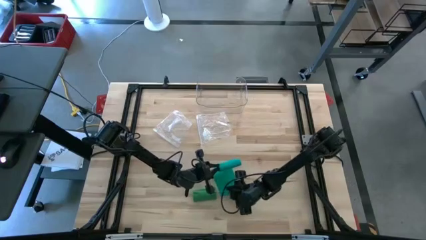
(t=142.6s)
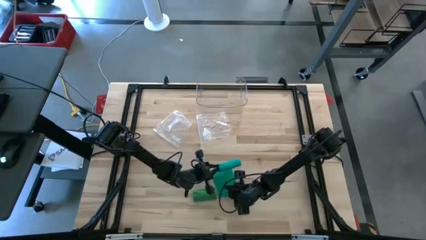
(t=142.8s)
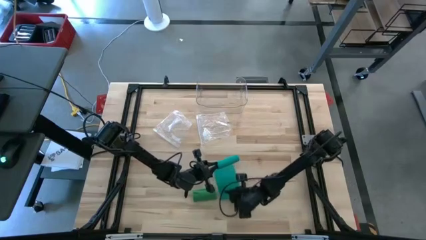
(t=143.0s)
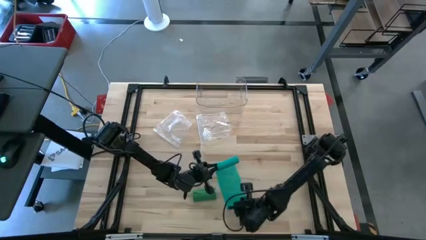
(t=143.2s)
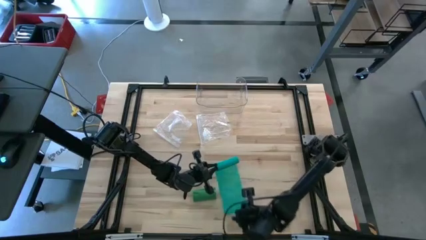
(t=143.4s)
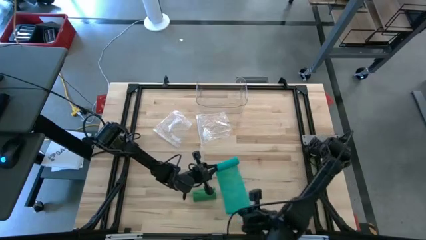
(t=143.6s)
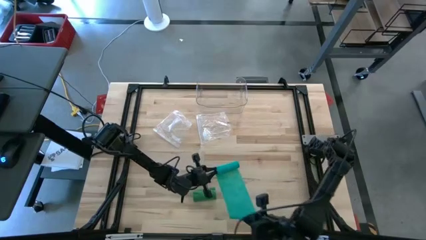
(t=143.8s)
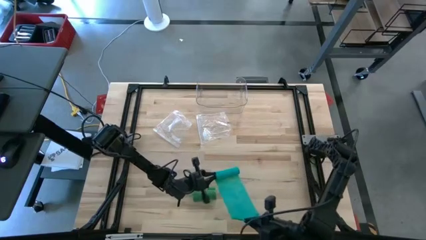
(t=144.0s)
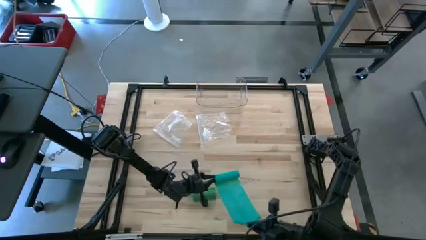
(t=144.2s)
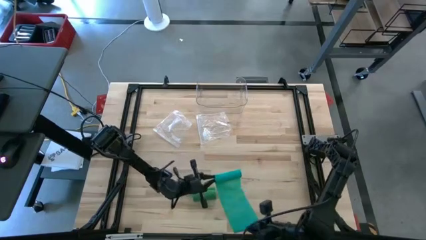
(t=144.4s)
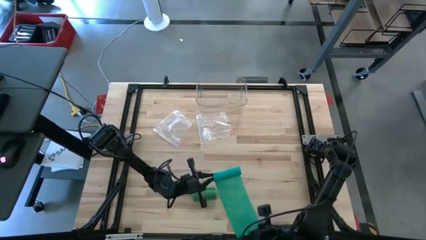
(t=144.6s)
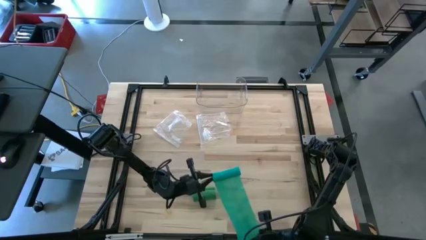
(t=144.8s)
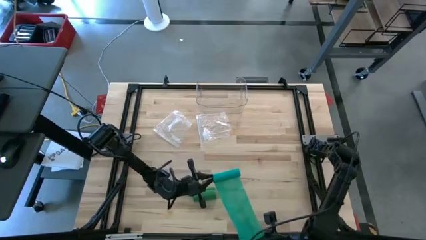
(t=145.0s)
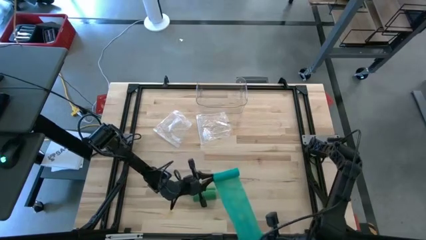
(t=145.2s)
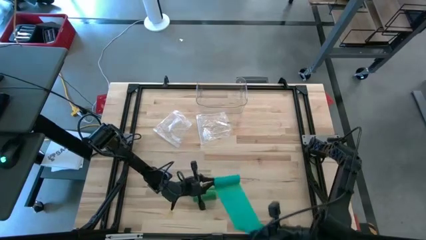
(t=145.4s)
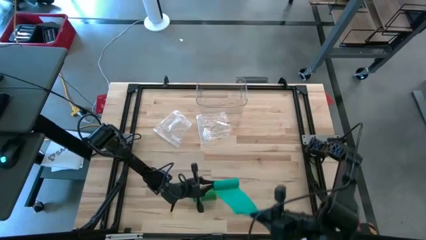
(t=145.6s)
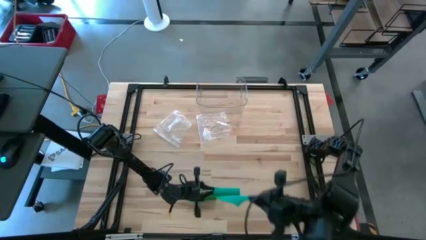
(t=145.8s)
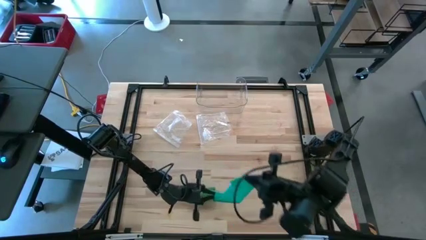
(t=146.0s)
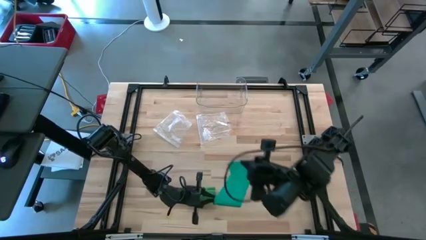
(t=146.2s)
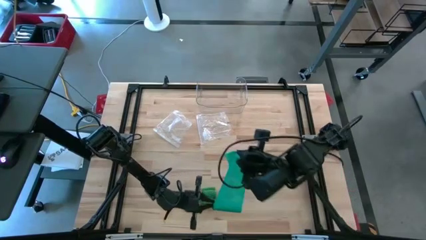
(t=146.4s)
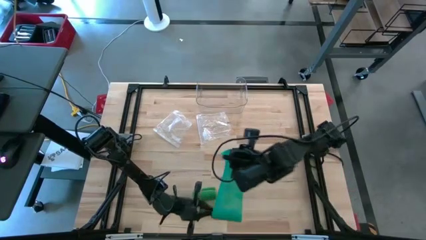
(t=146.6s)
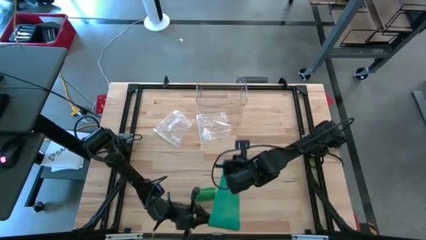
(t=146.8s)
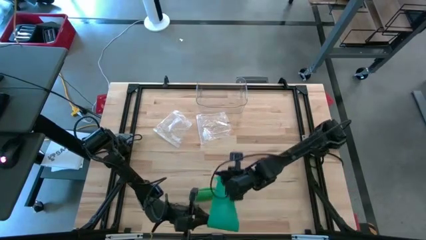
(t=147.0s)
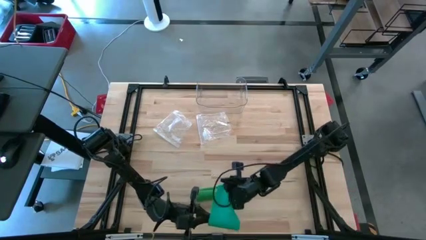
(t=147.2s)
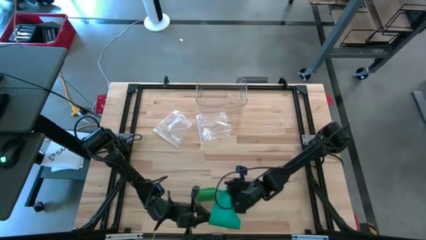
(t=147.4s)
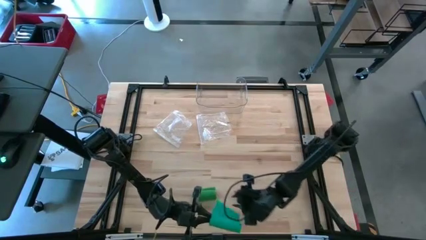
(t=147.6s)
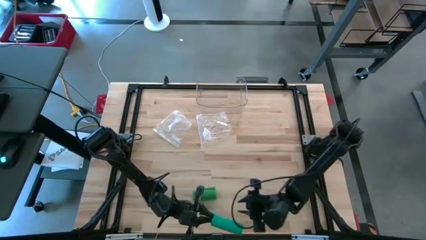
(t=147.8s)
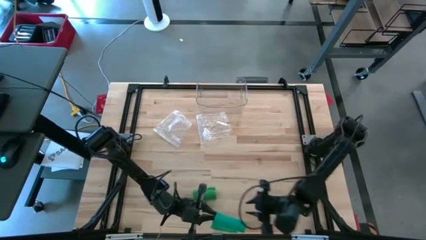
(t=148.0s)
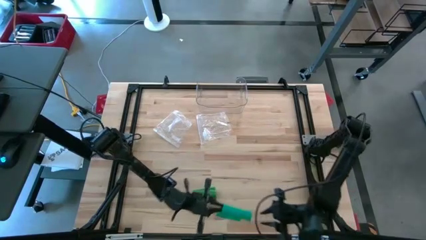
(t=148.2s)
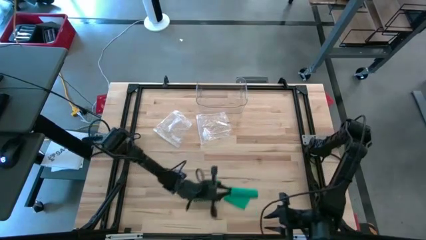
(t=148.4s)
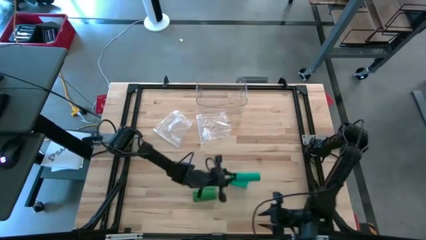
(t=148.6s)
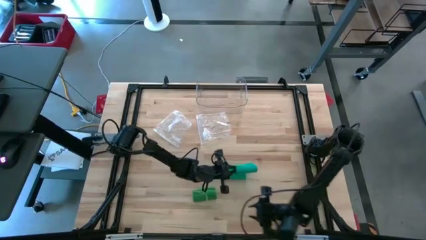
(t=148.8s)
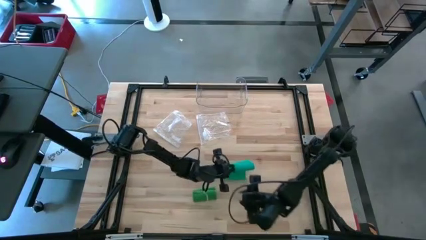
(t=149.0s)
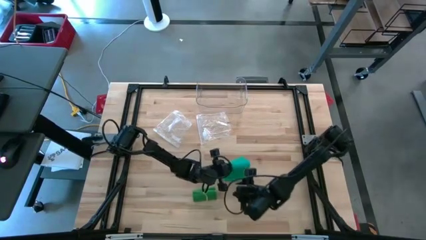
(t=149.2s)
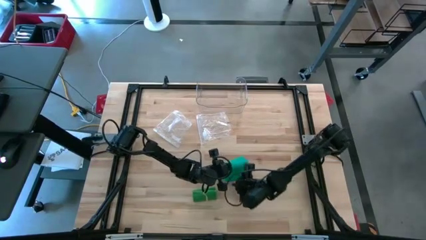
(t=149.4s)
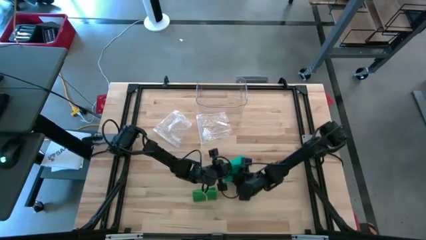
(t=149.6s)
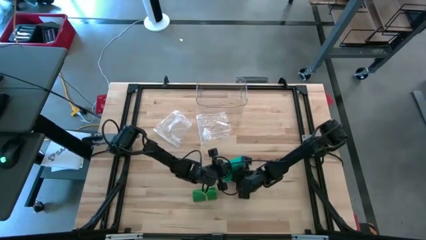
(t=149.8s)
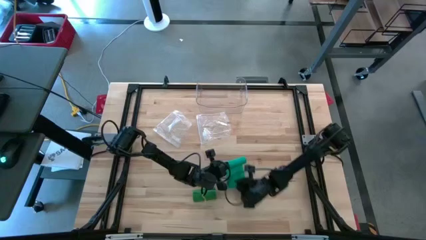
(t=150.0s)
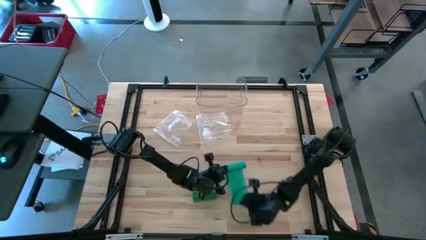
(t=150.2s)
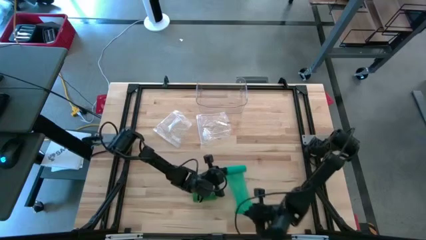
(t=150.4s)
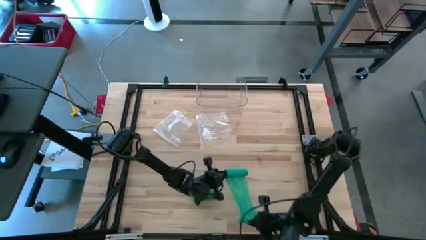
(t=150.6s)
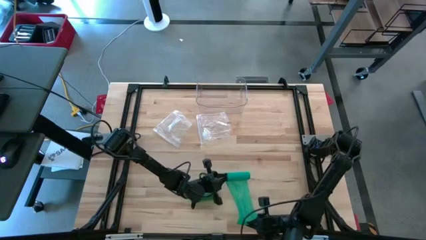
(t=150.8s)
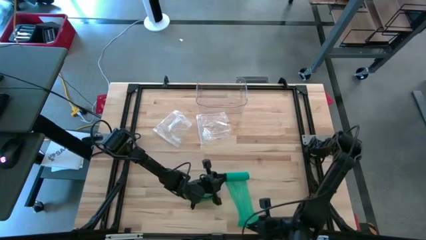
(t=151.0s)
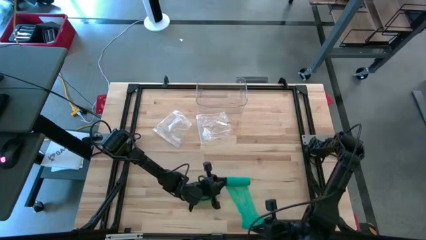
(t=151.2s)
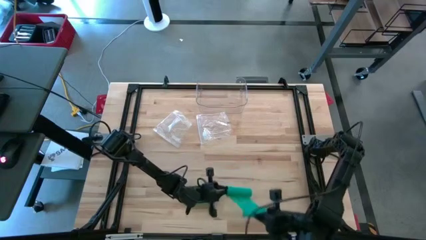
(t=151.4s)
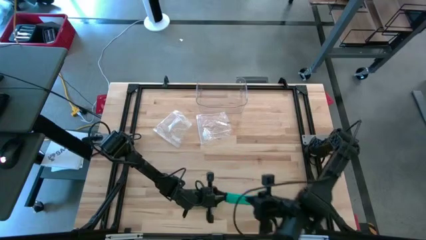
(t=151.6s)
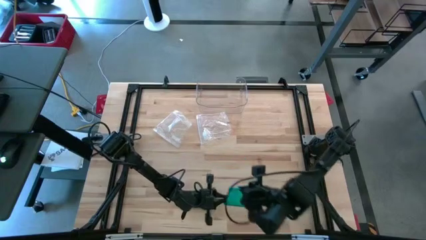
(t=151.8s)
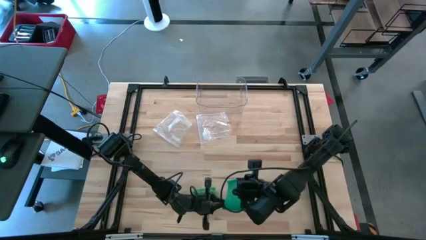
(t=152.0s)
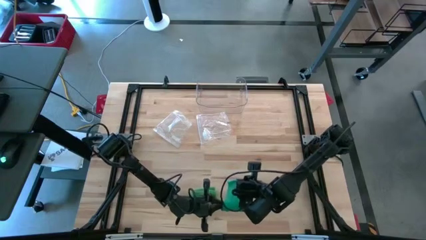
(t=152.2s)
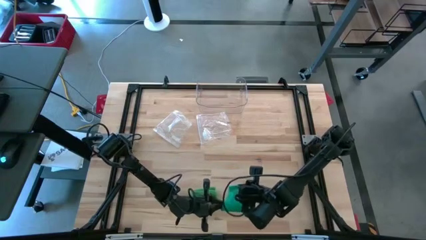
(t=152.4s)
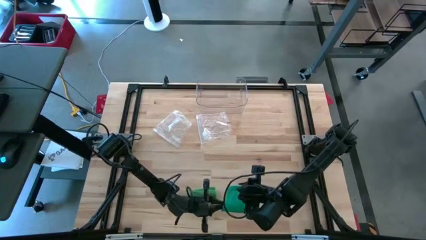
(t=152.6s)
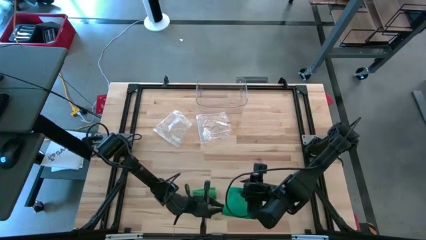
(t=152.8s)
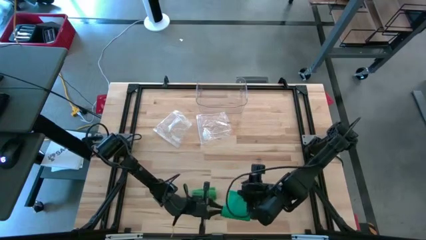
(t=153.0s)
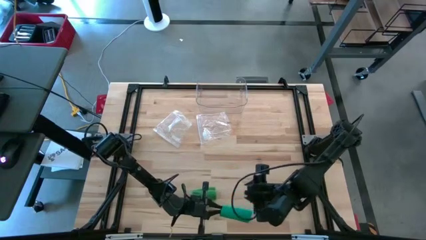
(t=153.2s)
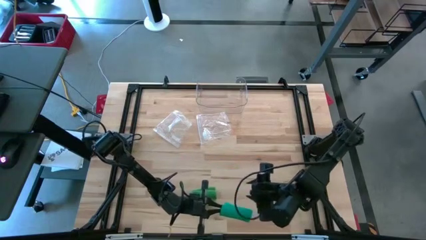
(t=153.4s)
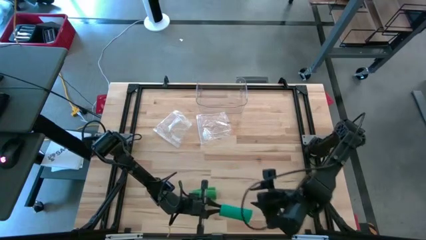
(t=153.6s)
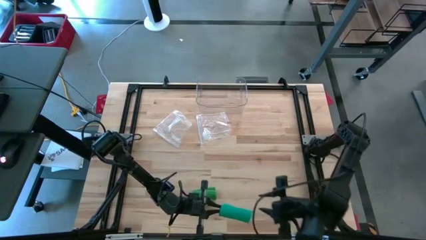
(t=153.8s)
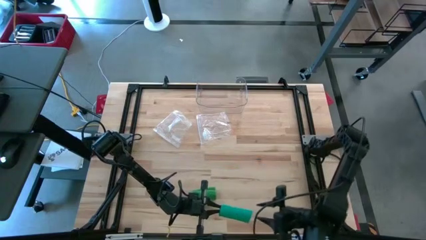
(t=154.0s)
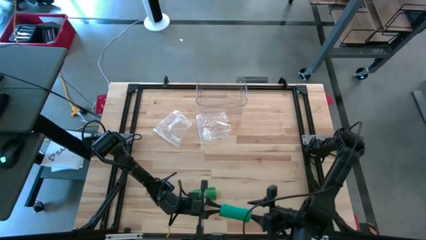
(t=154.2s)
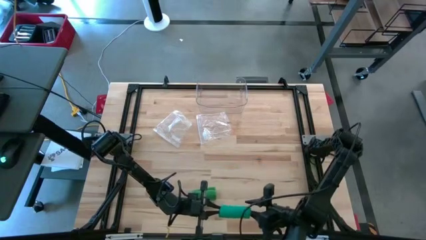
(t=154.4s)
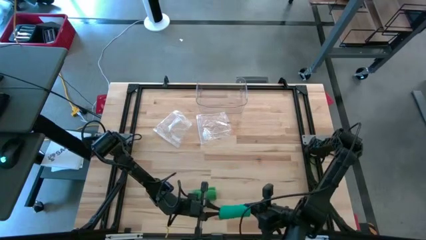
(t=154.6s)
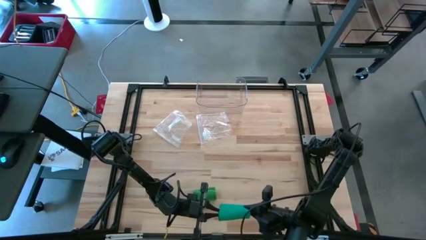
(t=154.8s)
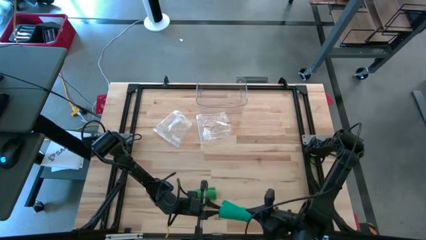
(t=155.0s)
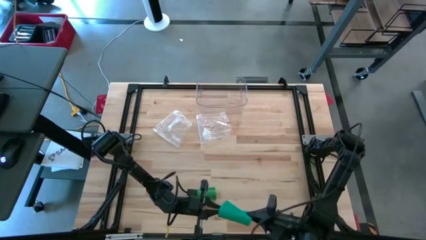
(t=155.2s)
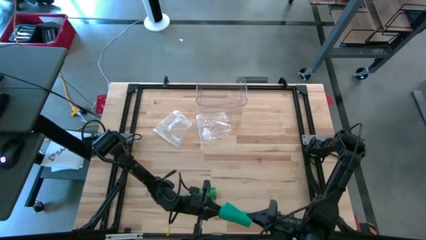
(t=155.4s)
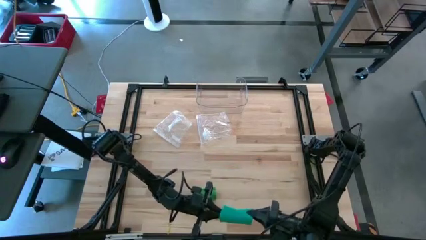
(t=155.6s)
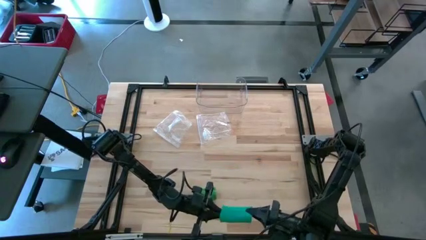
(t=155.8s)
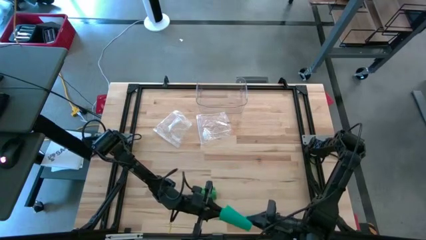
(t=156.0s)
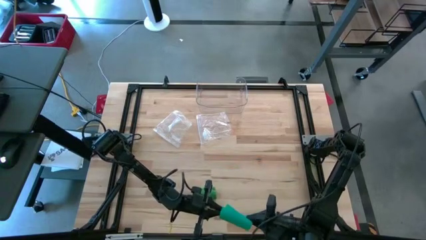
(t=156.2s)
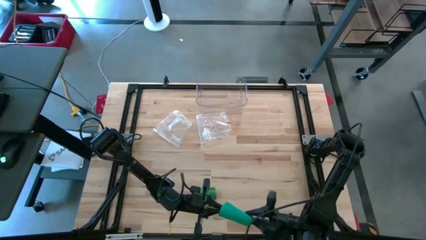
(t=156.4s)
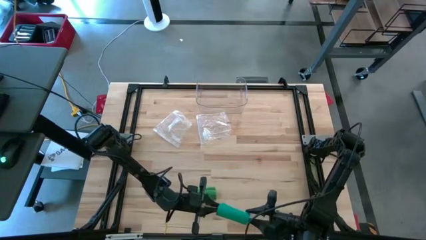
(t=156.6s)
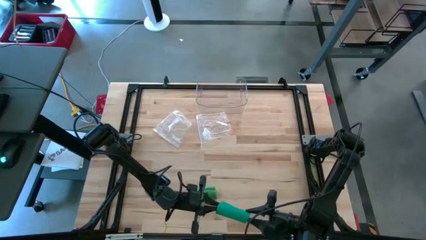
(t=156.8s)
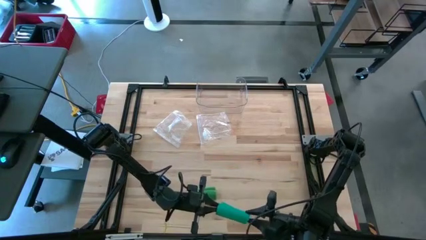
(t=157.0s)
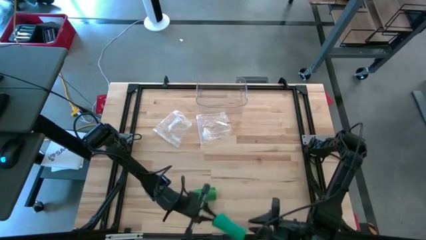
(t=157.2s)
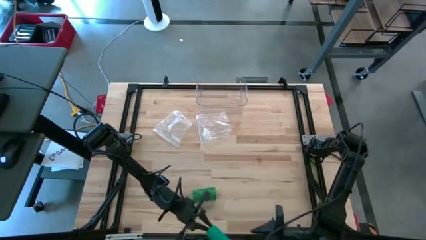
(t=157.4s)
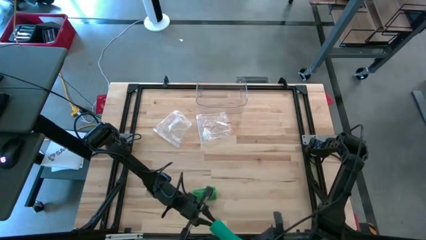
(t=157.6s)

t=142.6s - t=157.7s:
Task: Roll bandage
Roll the blue bandage

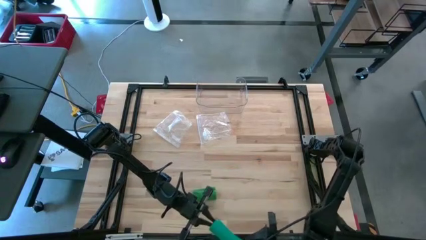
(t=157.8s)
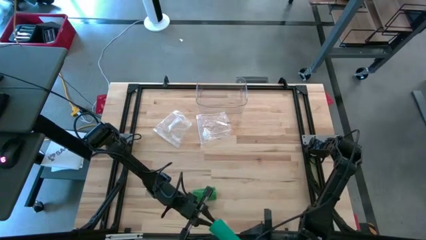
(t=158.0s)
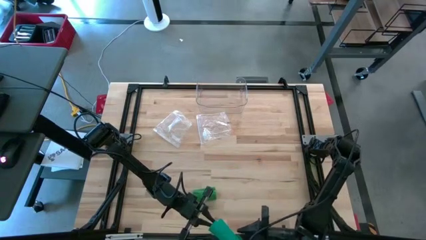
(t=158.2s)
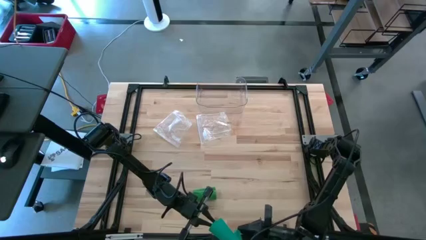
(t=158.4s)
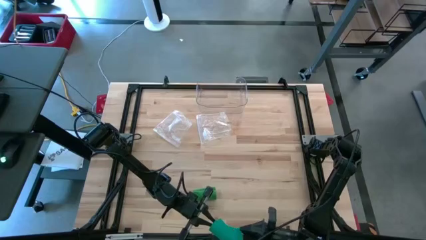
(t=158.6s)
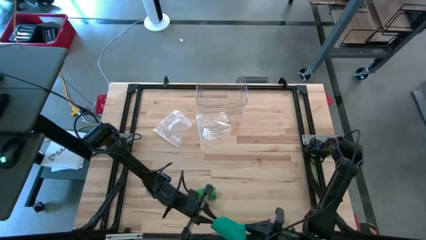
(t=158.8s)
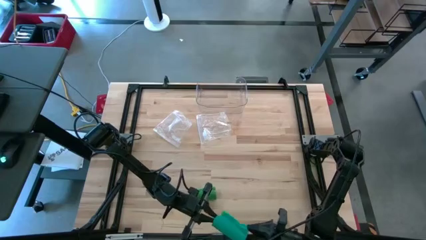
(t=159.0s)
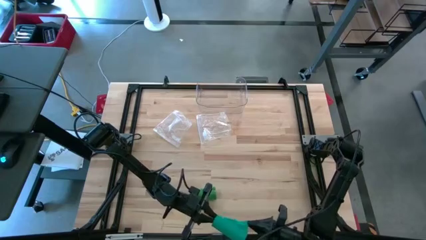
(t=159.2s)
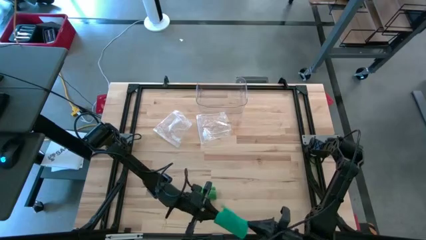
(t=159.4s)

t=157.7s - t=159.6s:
Roll the blue bandage
